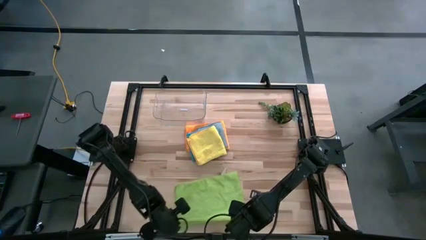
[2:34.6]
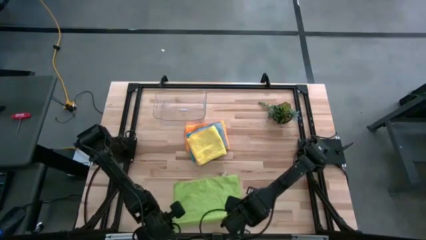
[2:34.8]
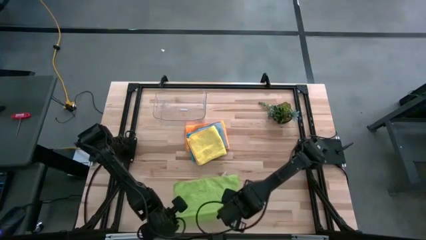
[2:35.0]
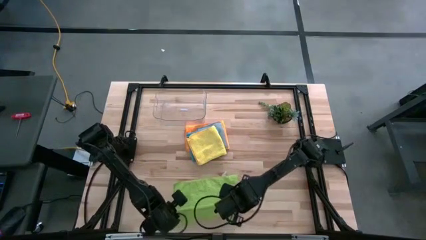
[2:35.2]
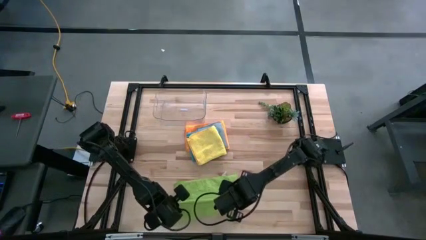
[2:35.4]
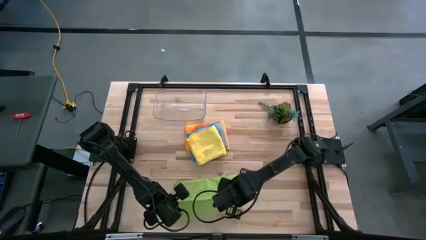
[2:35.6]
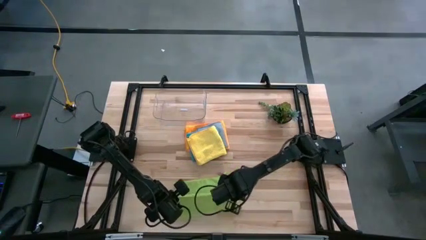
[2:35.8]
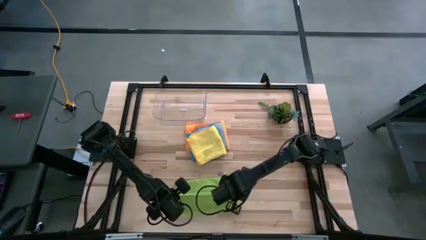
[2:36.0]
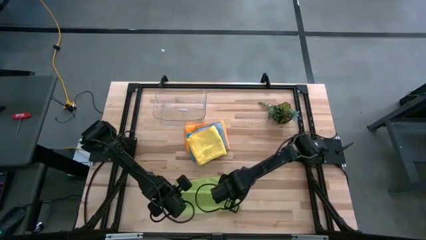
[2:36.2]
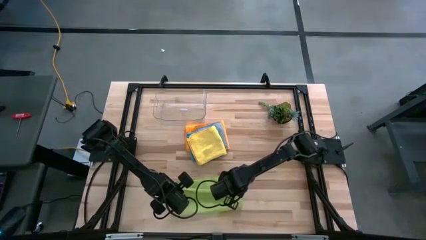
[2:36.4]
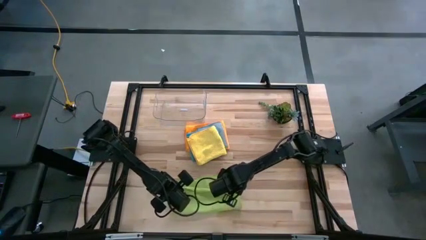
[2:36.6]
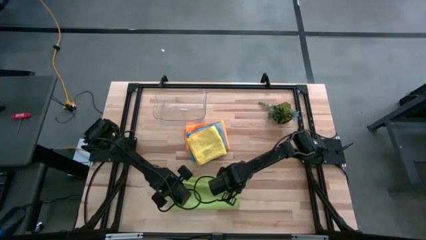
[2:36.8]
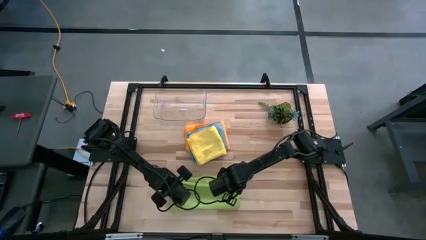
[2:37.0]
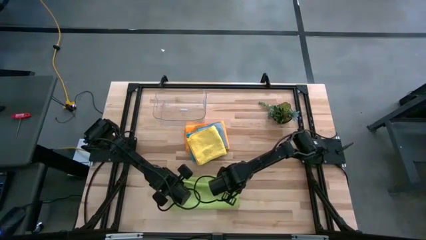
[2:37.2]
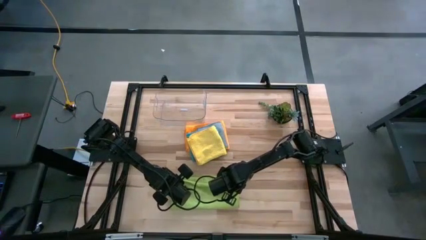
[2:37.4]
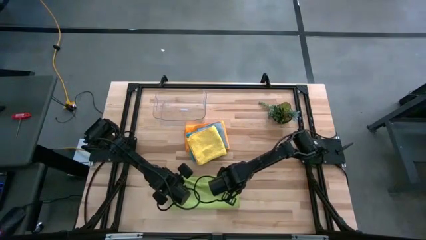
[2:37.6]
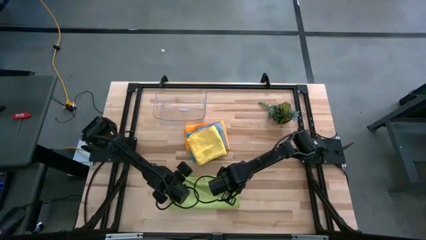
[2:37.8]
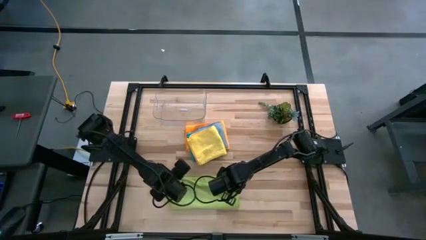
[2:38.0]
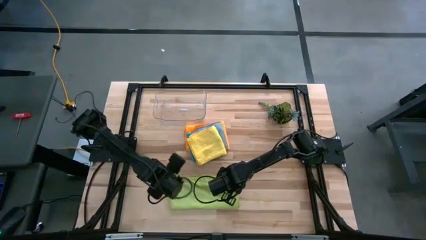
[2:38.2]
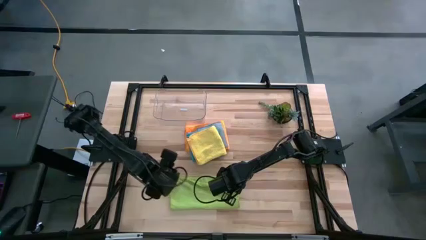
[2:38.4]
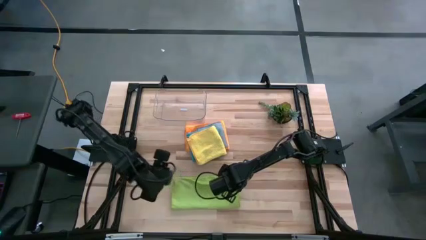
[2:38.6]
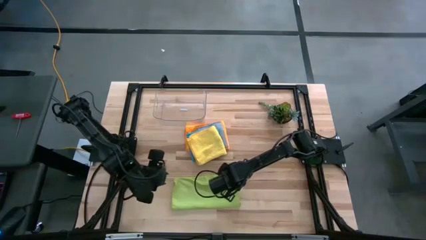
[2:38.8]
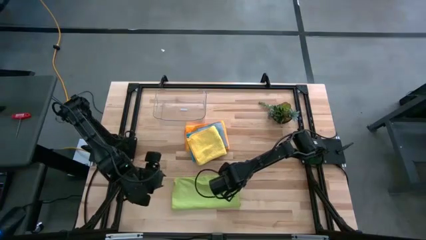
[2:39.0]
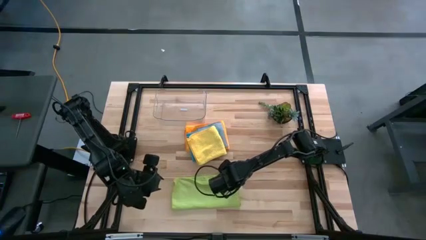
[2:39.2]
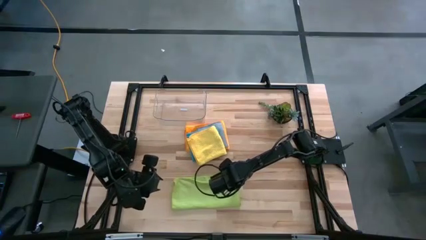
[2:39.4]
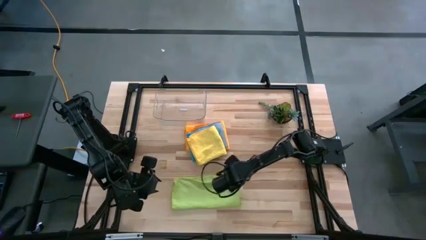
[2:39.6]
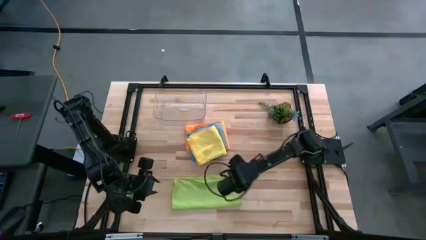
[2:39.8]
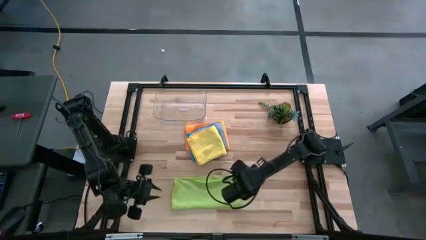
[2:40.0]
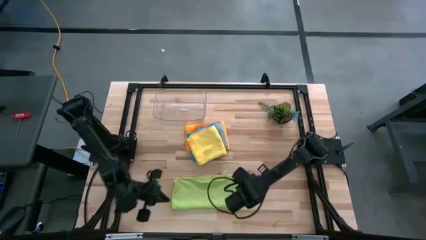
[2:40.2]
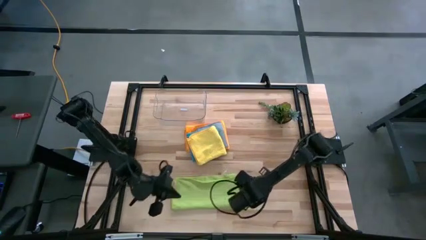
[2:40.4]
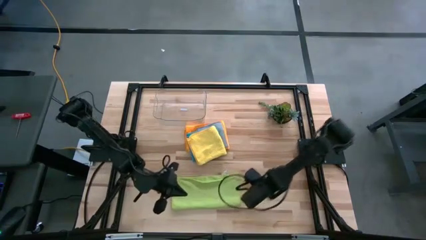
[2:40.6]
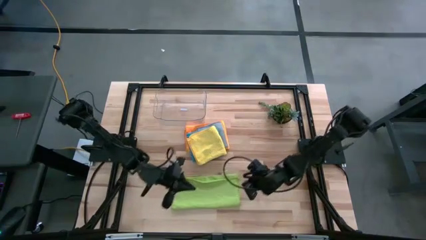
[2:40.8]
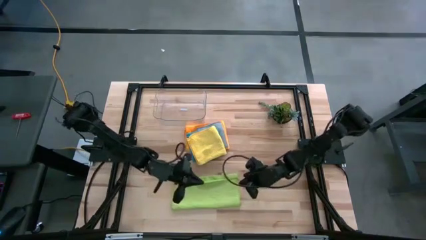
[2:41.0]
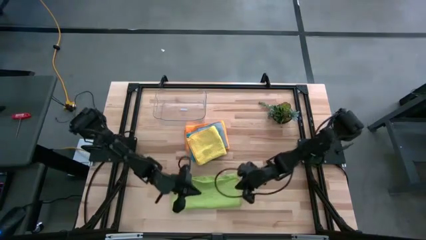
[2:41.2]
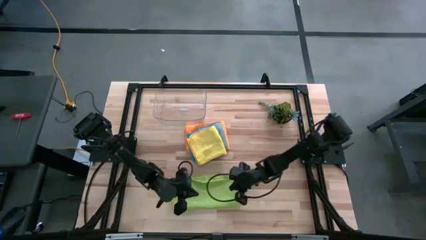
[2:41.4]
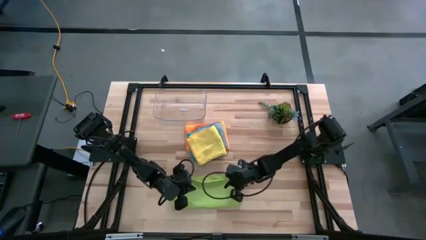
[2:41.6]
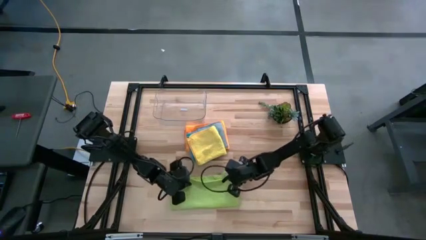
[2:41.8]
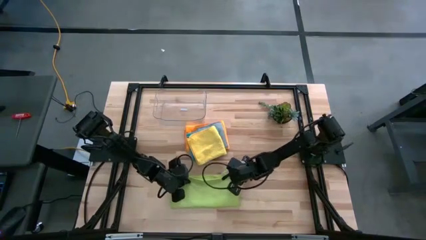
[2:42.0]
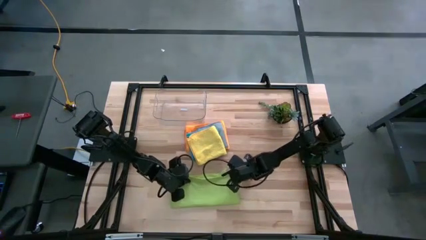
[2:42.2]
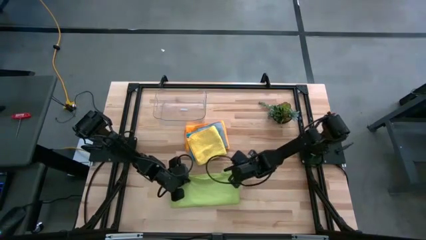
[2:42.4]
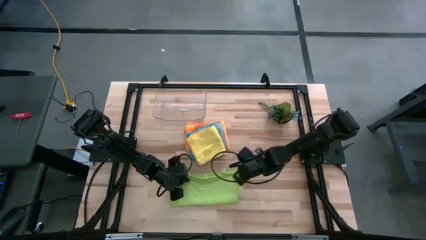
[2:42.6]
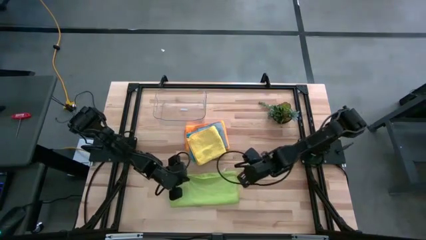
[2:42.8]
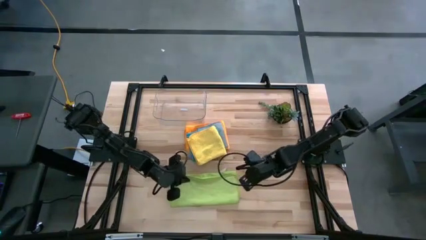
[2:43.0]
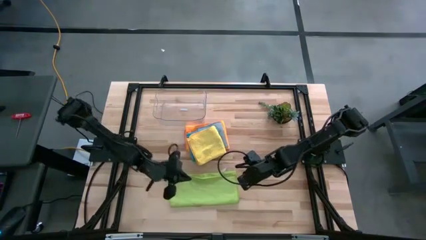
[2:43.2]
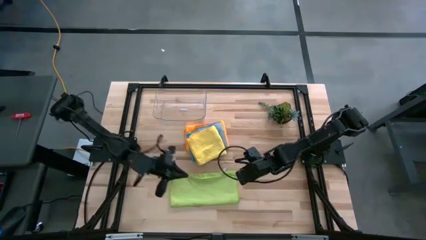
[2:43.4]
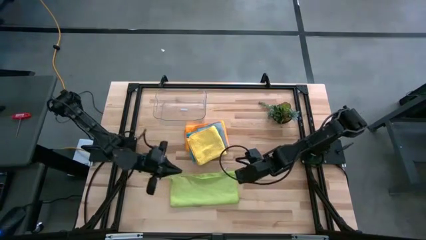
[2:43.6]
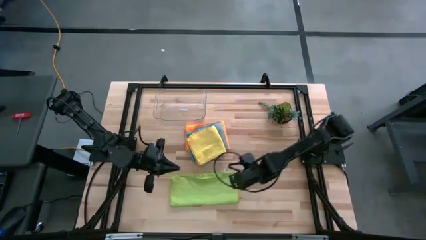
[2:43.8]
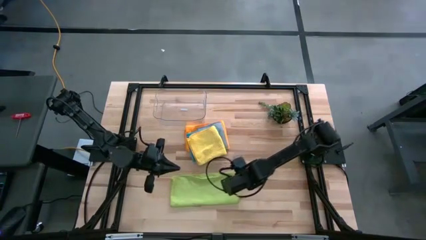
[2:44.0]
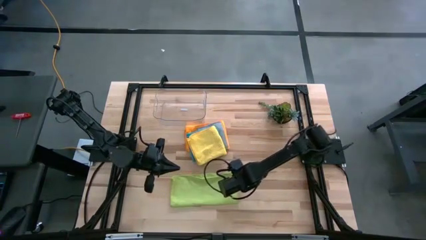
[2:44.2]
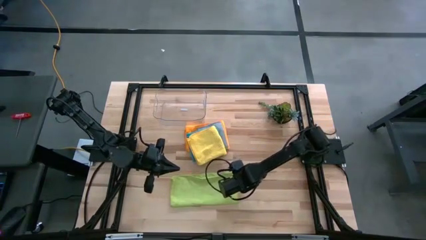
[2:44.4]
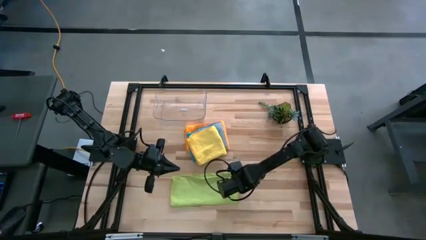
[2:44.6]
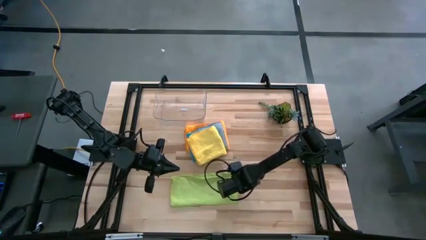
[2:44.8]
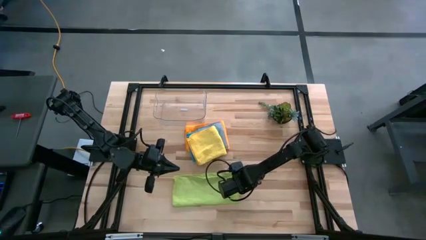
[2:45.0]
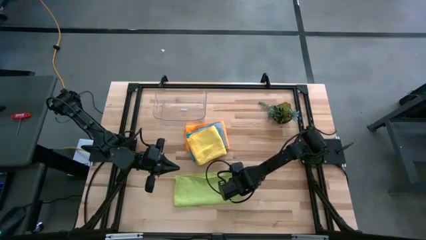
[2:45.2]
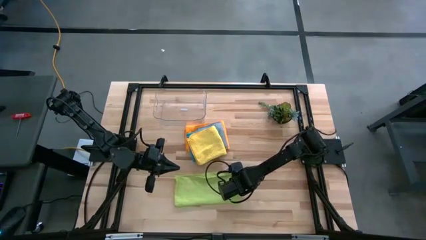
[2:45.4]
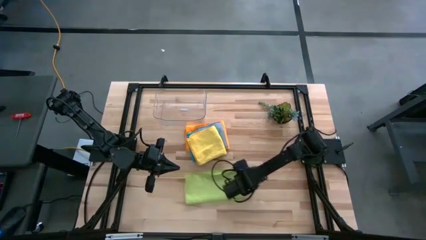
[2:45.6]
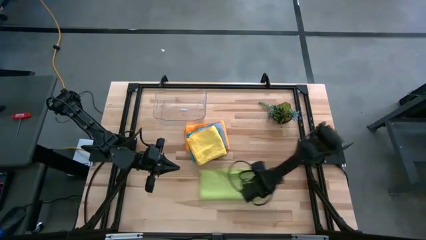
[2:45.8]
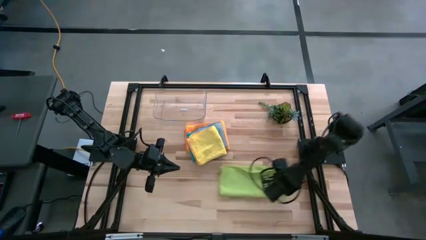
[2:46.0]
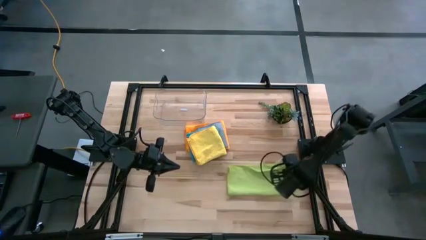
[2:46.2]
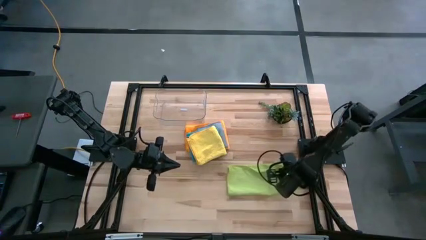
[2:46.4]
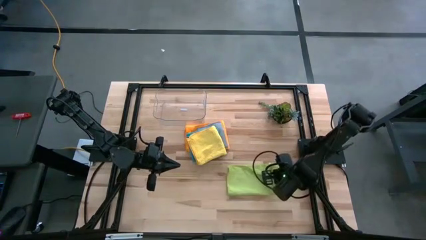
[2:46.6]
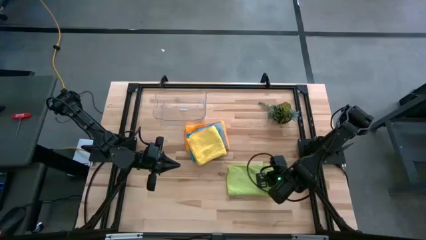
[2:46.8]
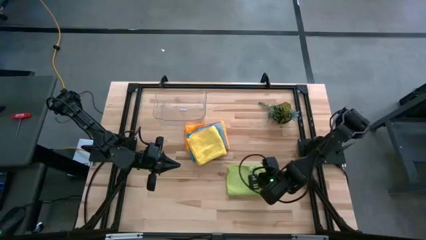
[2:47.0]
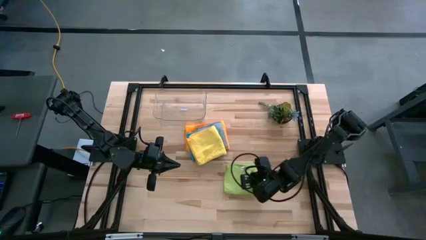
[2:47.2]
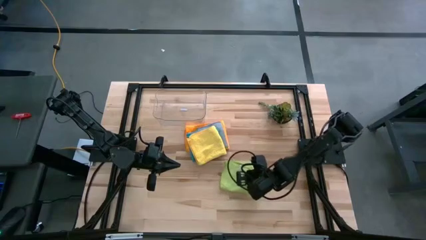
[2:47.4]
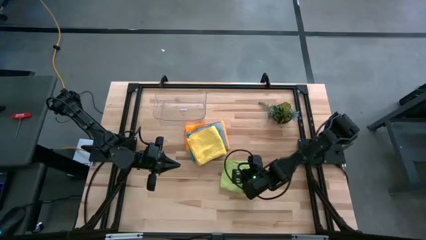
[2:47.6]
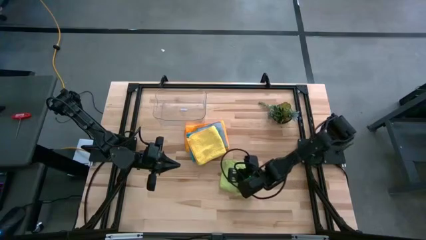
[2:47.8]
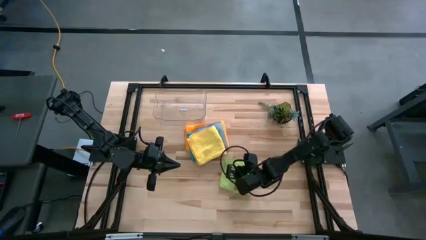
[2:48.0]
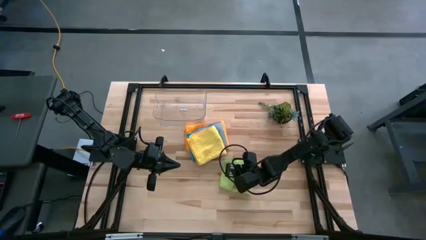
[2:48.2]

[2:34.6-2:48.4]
Task: Fold microfiber towels
Fold the green towel
